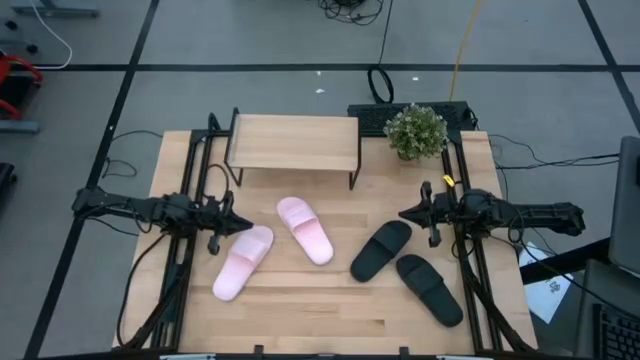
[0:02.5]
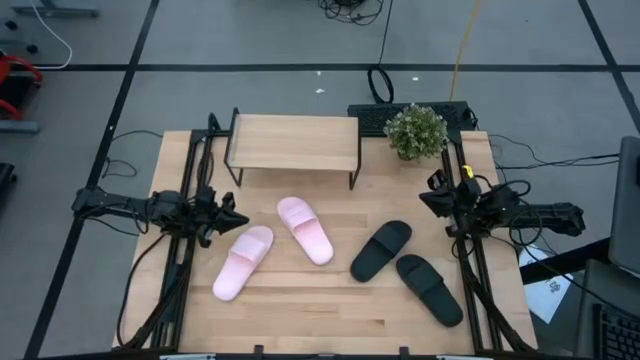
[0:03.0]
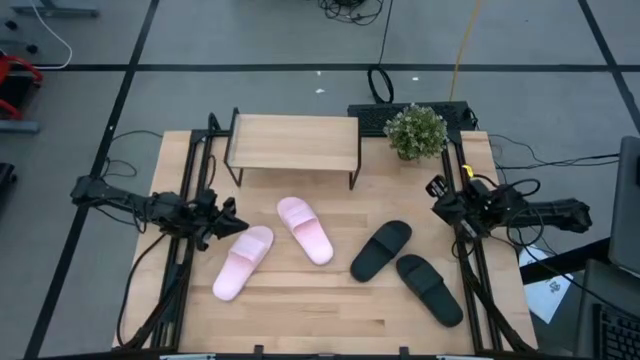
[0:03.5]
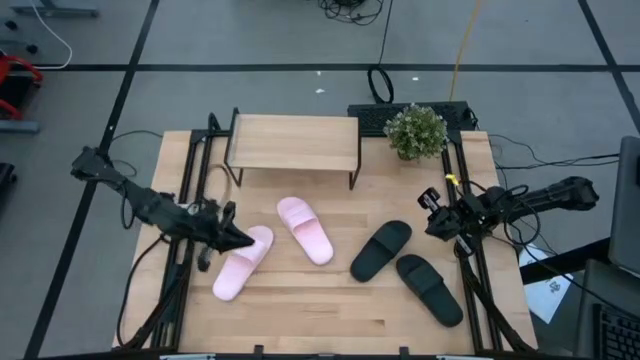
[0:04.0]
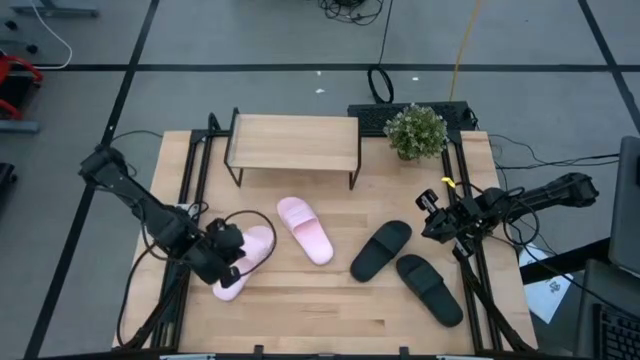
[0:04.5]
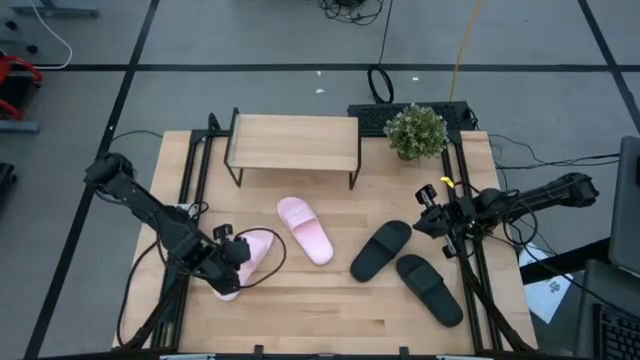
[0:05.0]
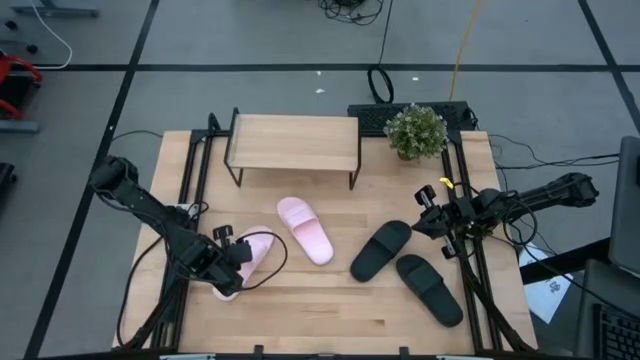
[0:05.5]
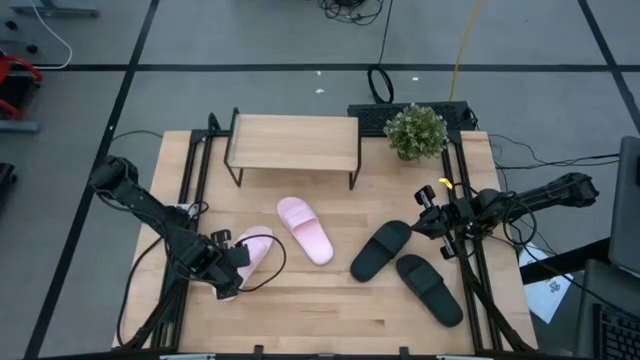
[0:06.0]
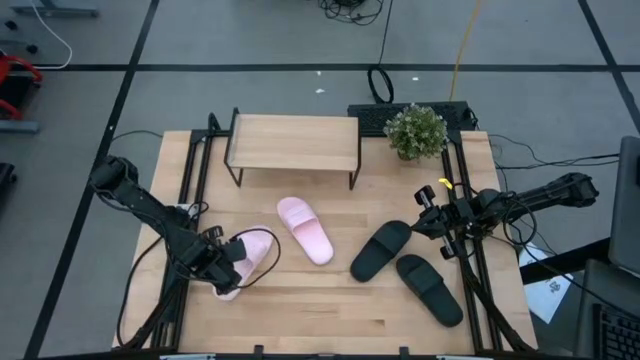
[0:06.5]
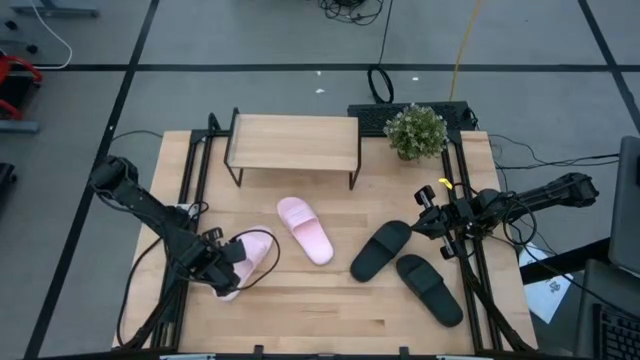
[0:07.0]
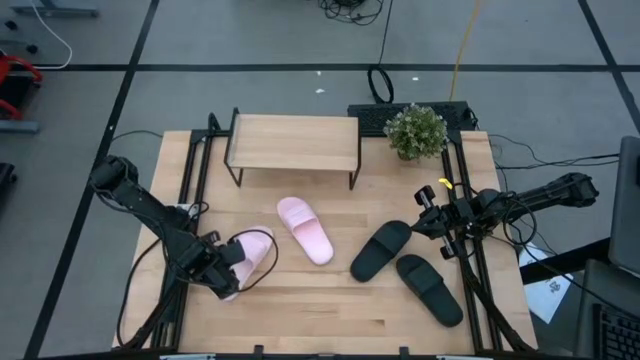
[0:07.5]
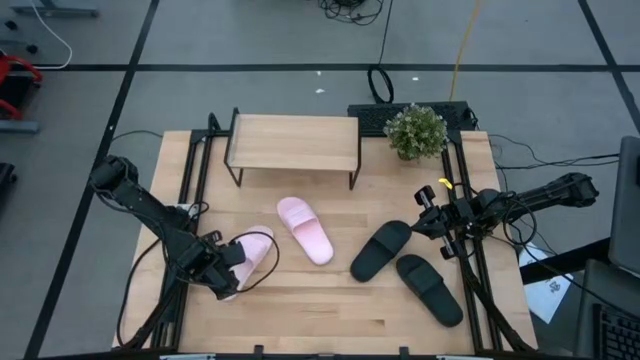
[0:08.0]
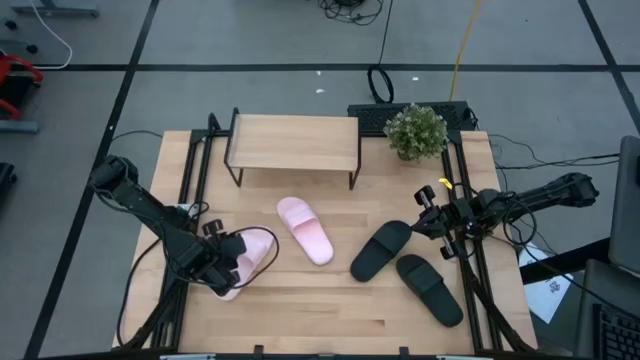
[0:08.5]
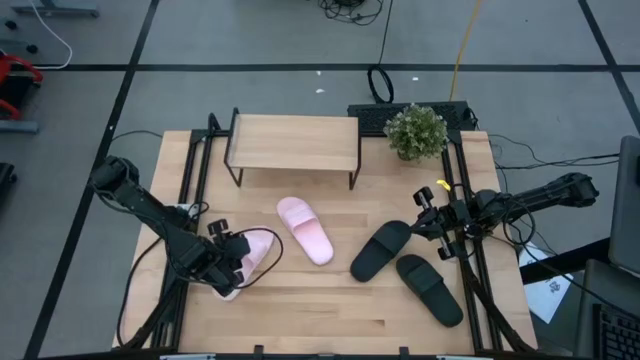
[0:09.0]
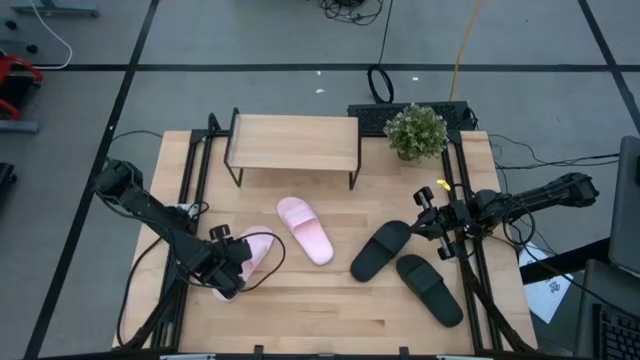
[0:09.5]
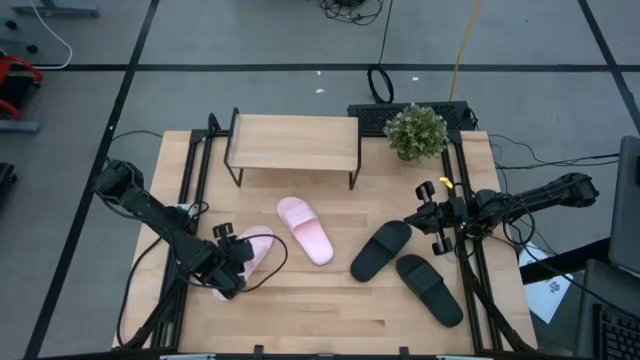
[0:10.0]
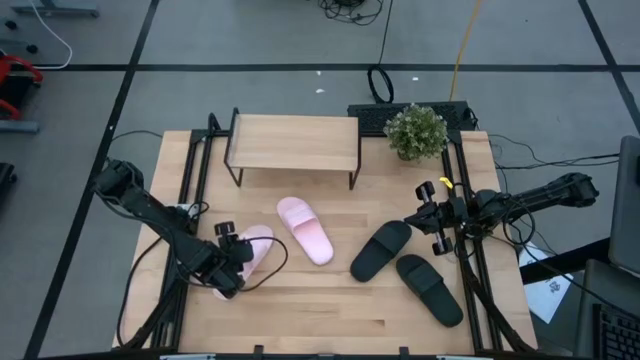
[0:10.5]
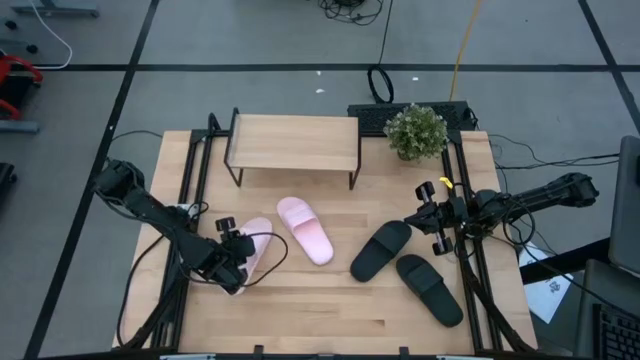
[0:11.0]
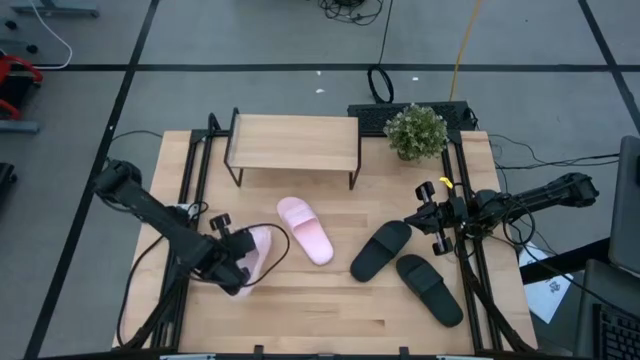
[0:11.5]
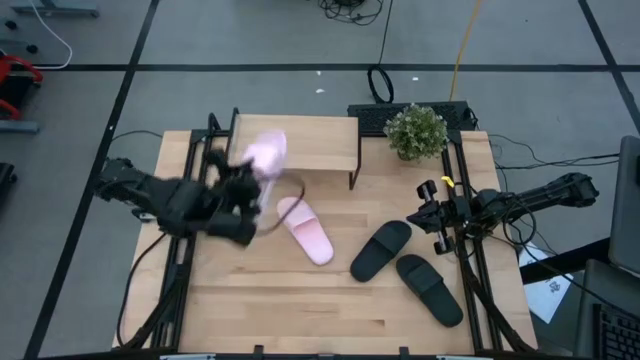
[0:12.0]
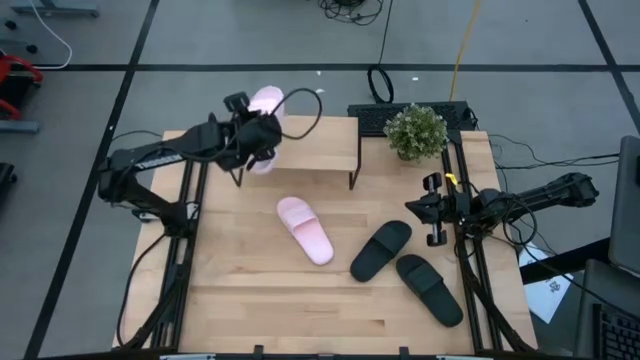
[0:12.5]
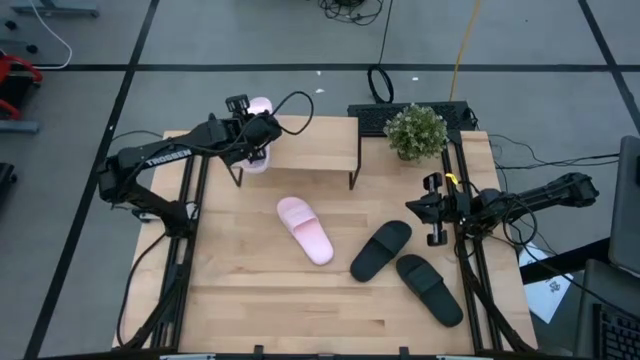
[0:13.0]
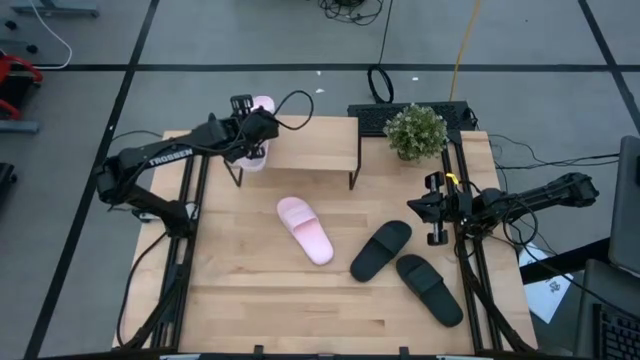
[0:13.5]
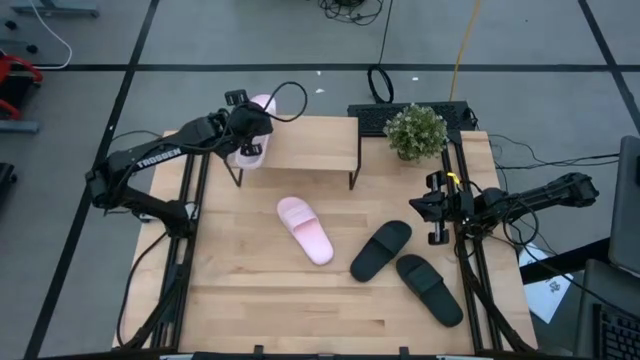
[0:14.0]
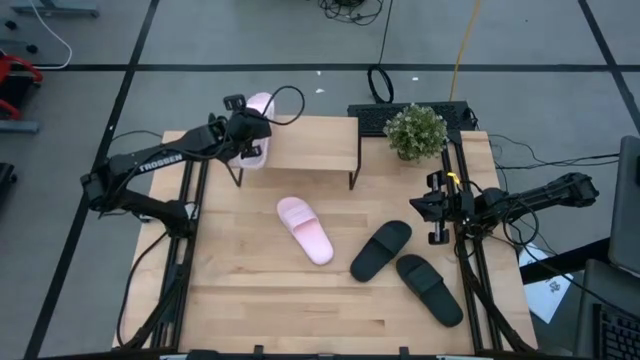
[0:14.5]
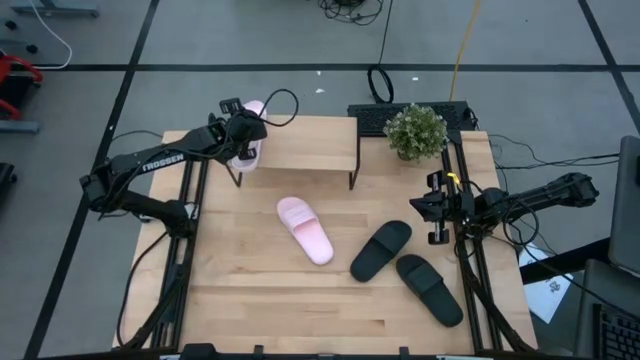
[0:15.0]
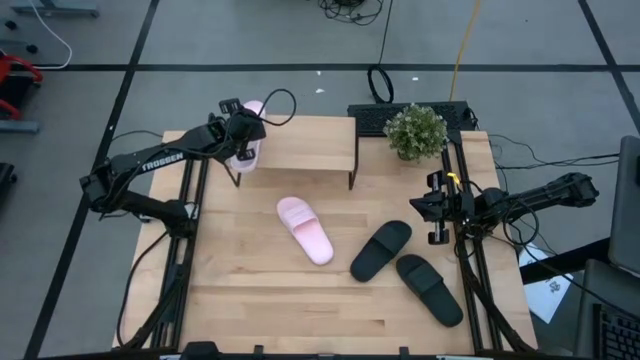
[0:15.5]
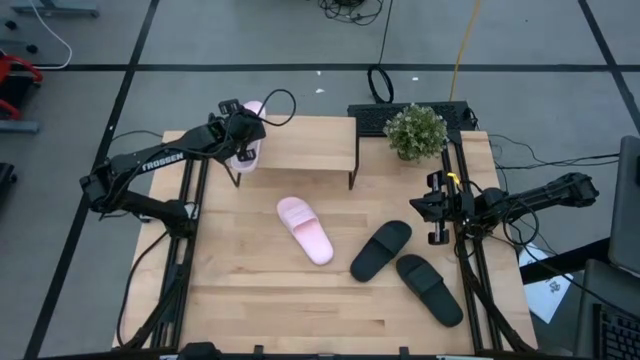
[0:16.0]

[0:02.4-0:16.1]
Task: Pick and place slides into the shelf
Put the left pink slides on the shelf

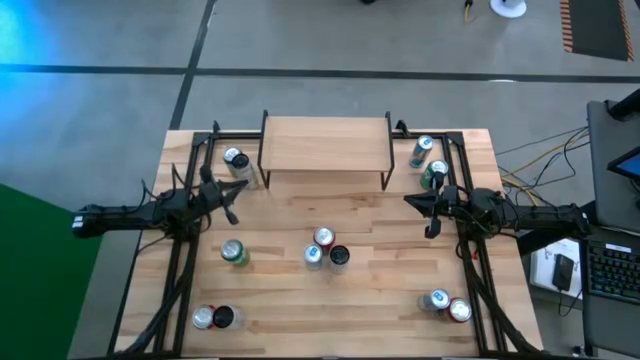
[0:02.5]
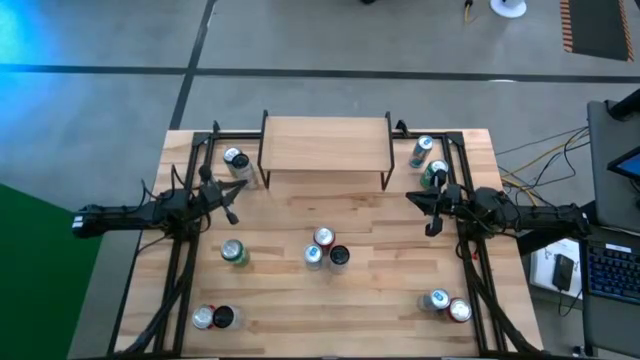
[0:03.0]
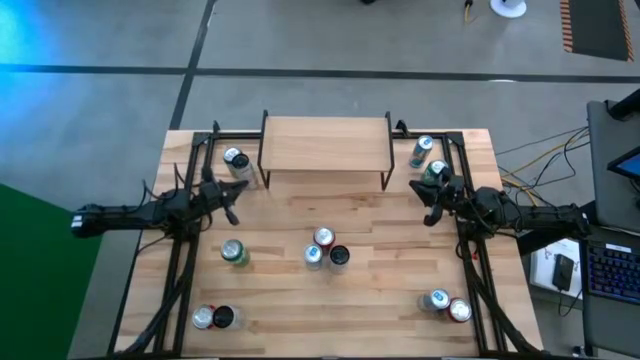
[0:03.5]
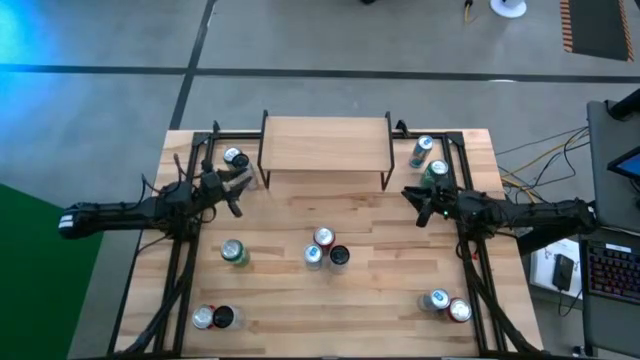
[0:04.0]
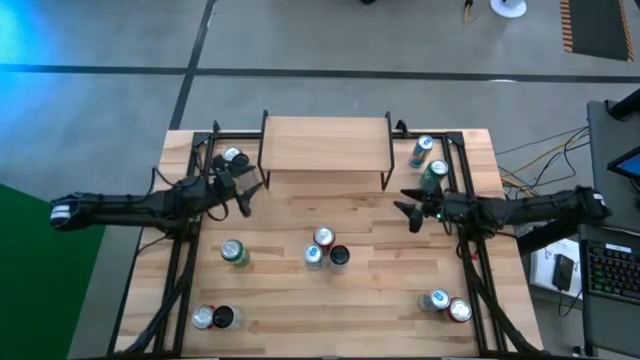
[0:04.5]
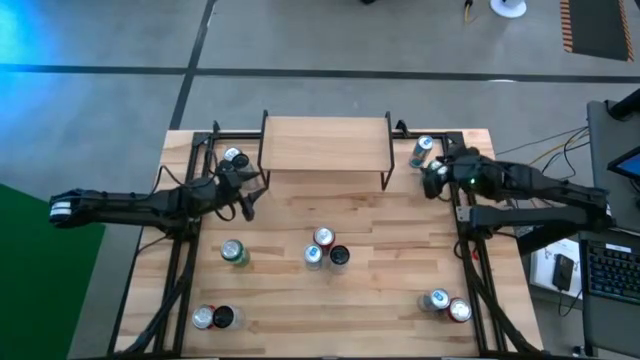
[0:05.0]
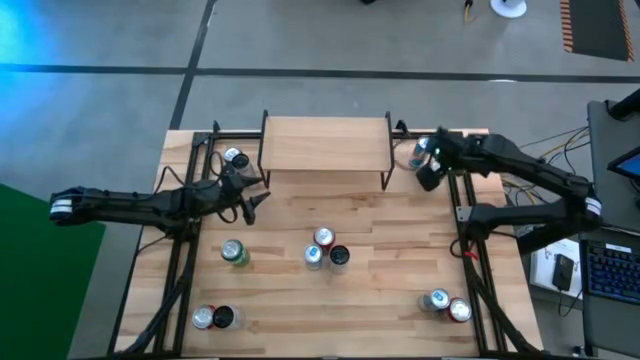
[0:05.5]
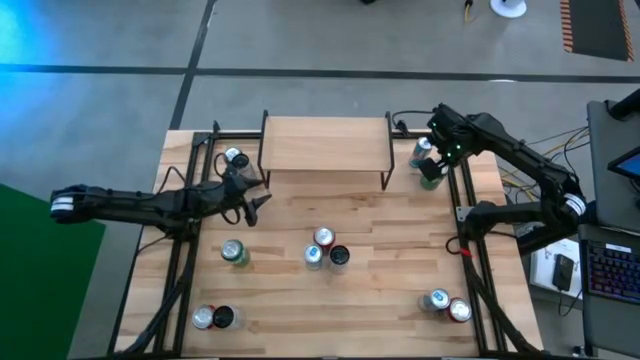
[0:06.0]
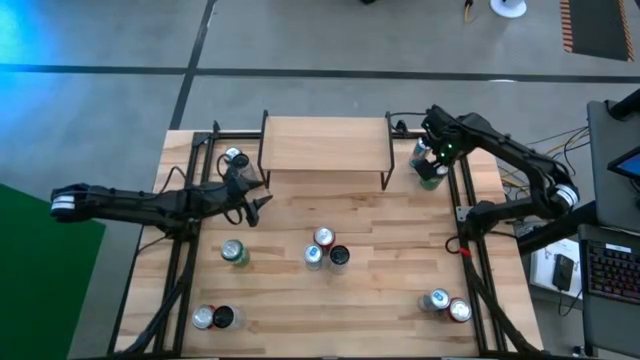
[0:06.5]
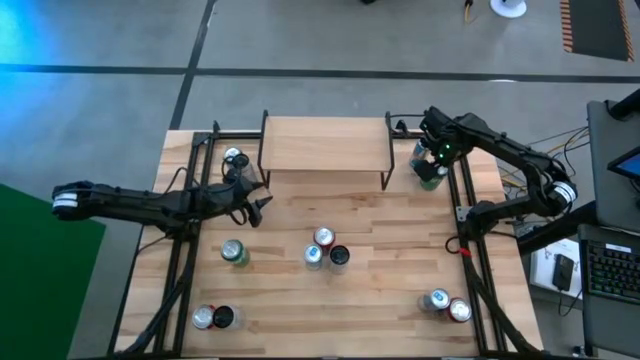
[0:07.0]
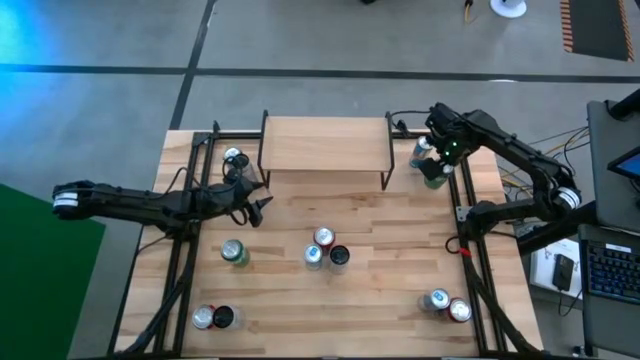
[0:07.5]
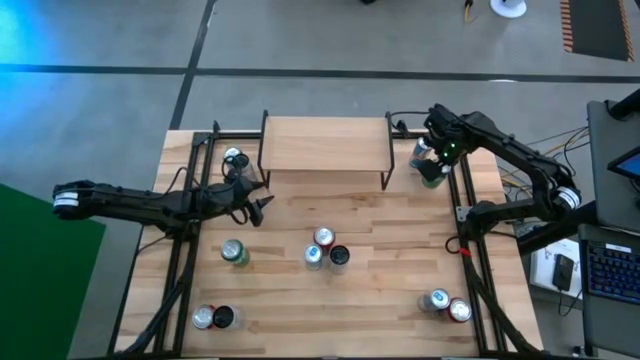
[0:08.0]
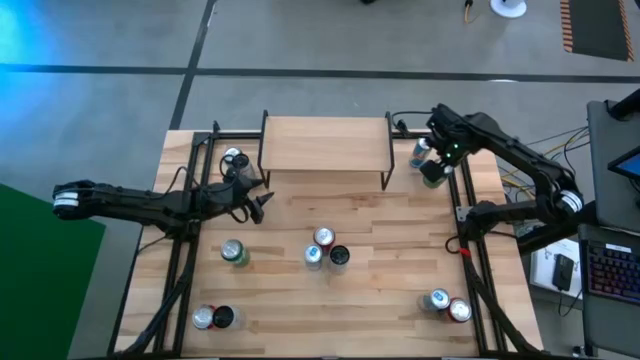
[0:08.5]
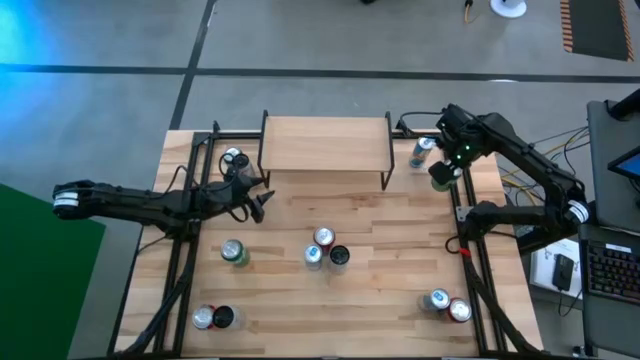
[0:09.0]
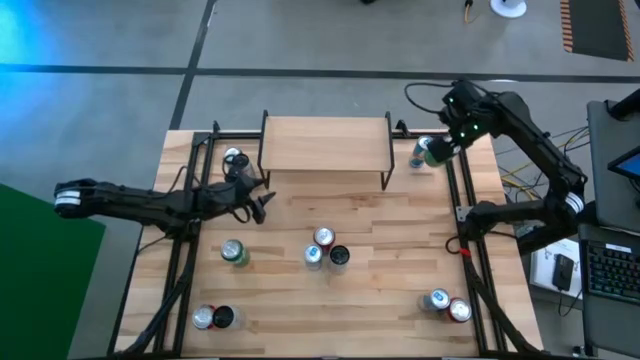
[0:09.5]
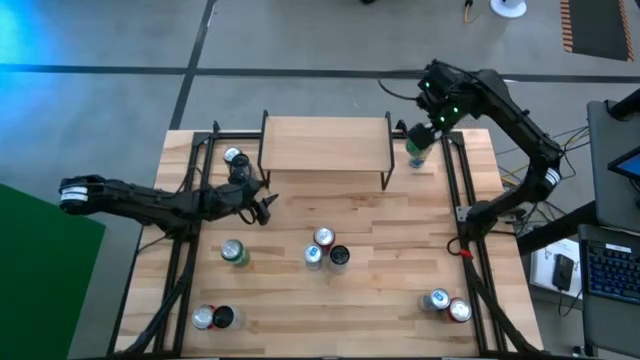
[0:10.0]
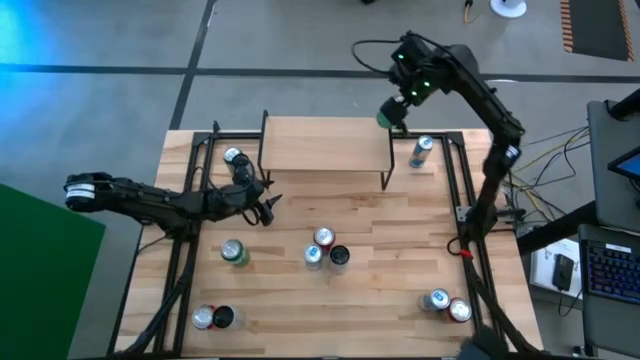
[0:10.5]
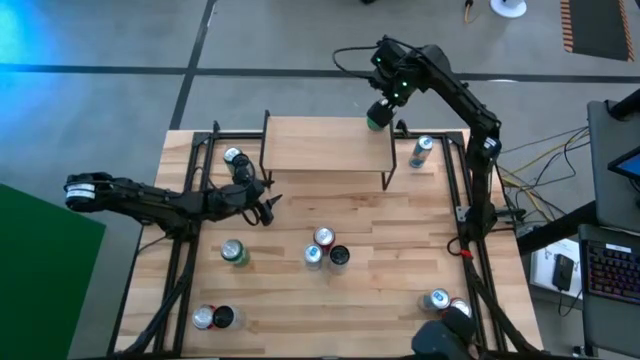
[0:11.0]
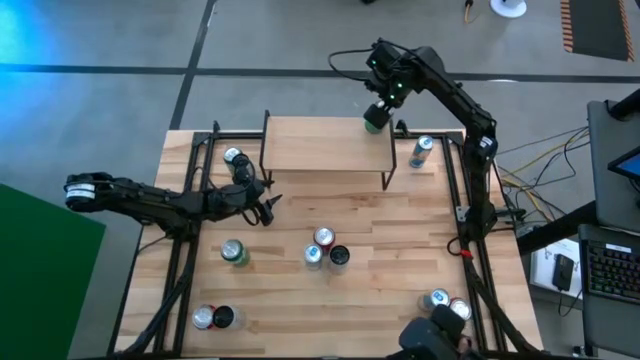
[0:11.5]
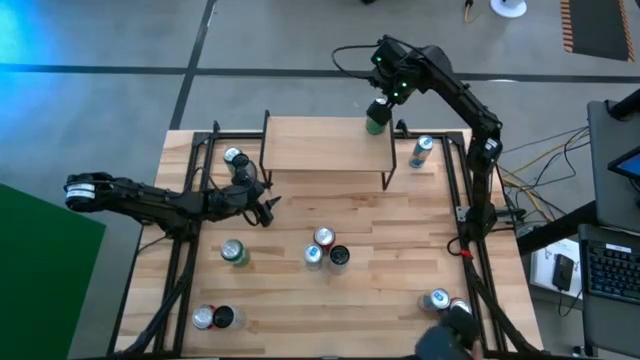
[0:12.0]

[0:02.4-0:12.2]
Task: Place canned beverage on shelf
Put the top right green soda can on the shelf
